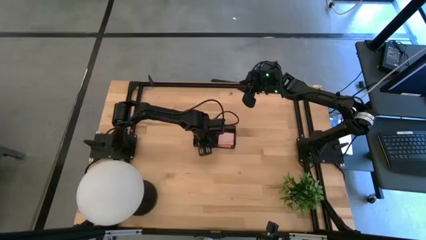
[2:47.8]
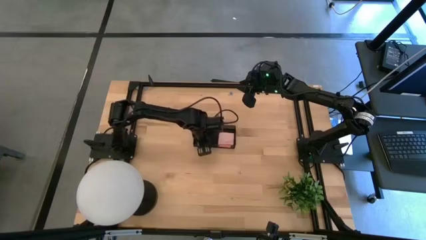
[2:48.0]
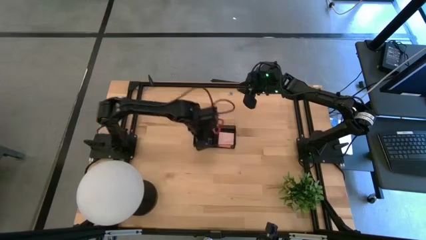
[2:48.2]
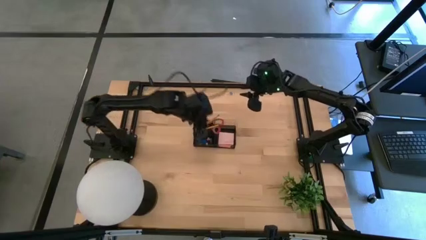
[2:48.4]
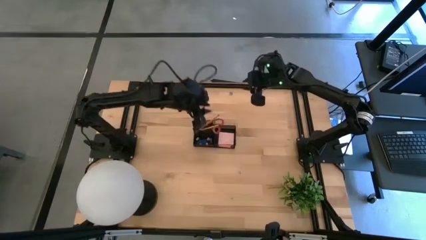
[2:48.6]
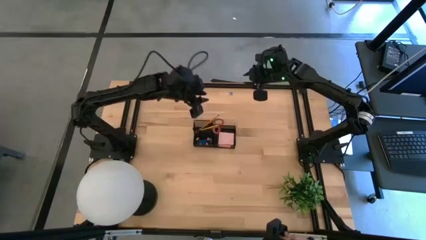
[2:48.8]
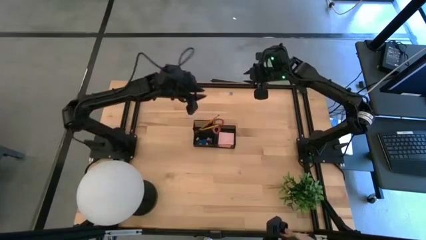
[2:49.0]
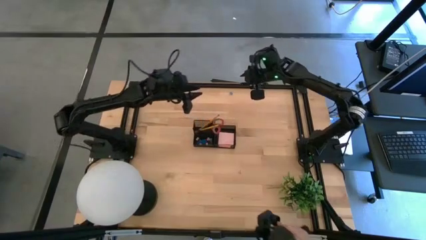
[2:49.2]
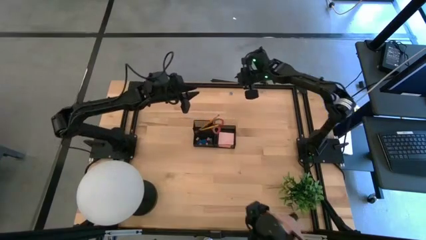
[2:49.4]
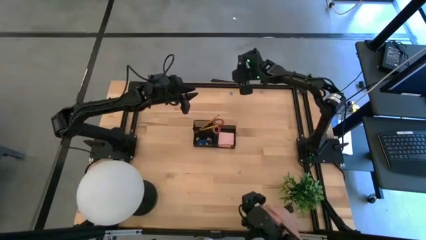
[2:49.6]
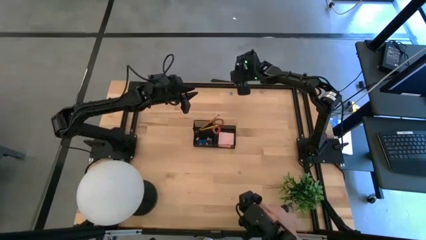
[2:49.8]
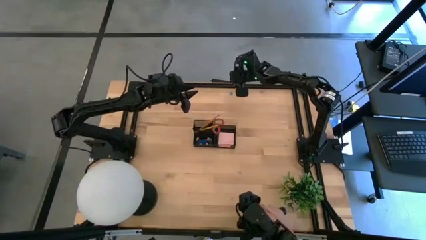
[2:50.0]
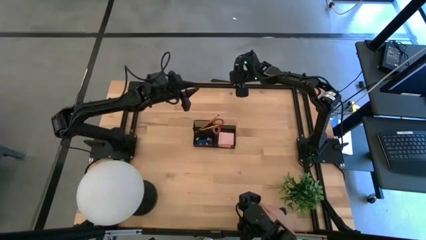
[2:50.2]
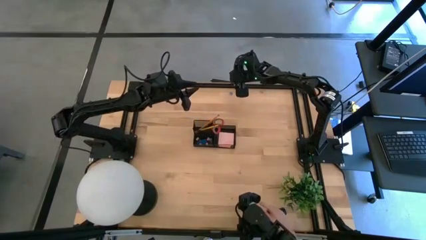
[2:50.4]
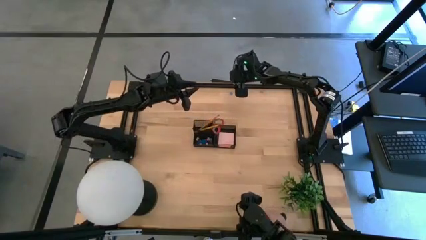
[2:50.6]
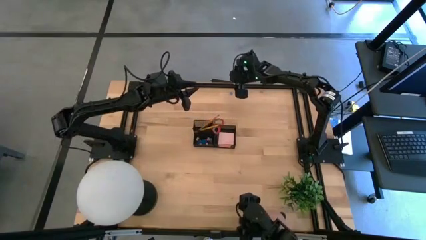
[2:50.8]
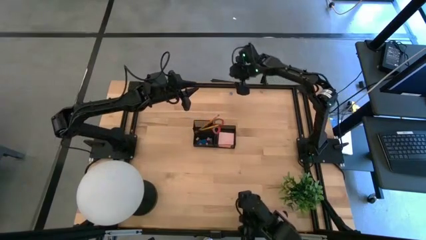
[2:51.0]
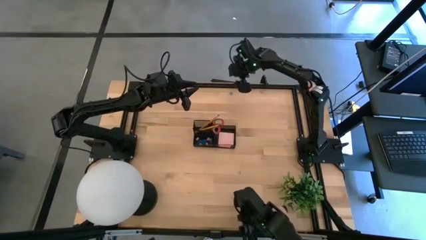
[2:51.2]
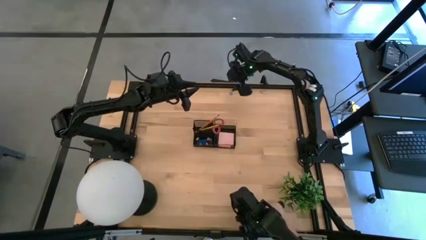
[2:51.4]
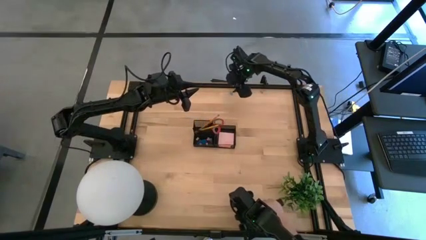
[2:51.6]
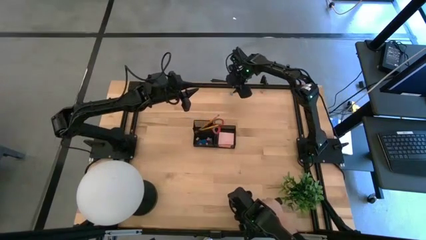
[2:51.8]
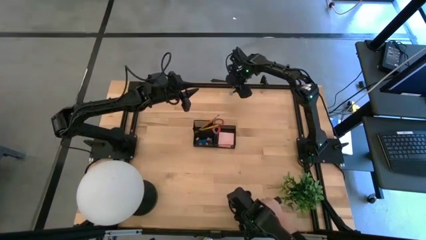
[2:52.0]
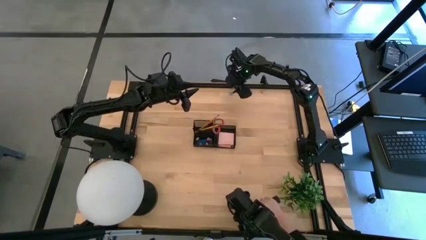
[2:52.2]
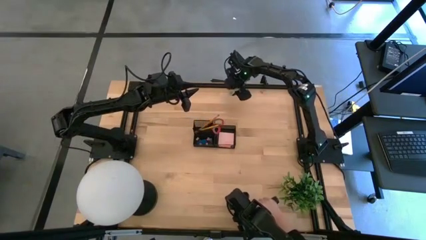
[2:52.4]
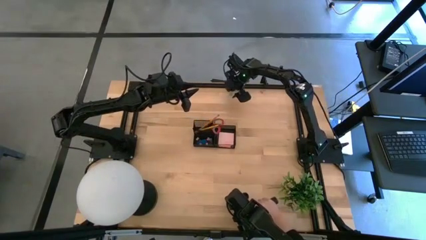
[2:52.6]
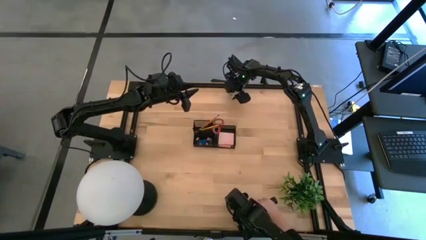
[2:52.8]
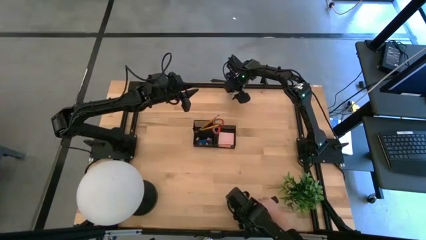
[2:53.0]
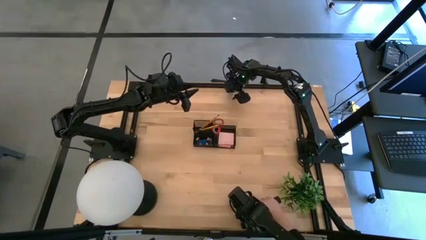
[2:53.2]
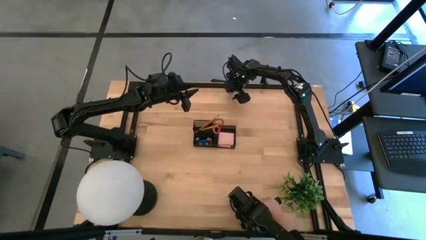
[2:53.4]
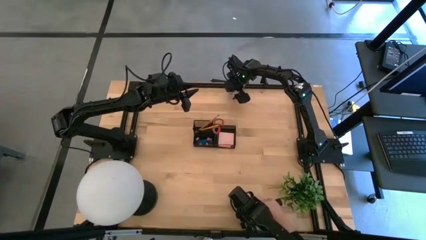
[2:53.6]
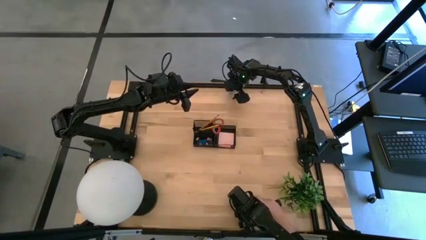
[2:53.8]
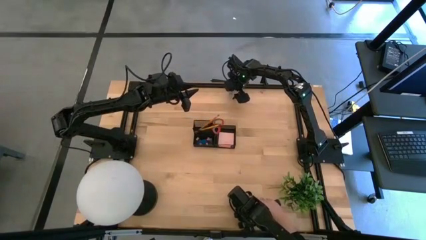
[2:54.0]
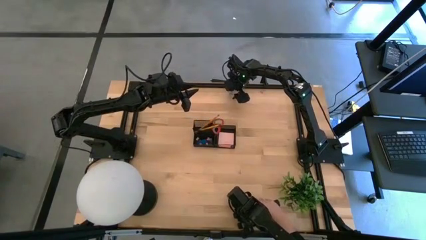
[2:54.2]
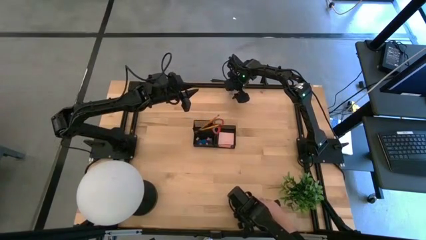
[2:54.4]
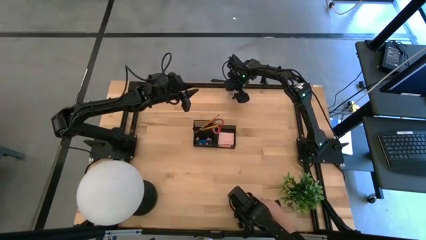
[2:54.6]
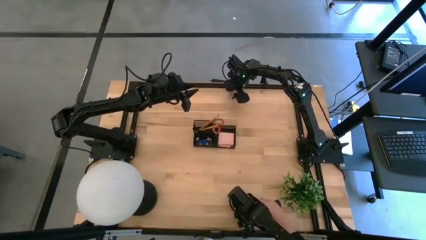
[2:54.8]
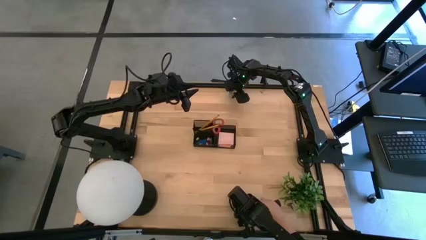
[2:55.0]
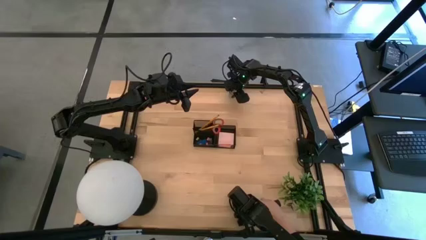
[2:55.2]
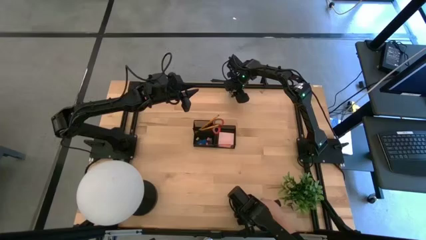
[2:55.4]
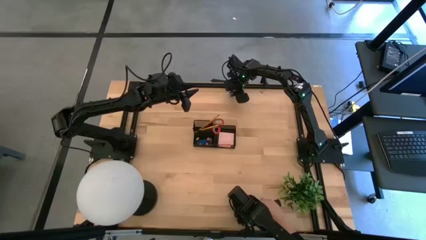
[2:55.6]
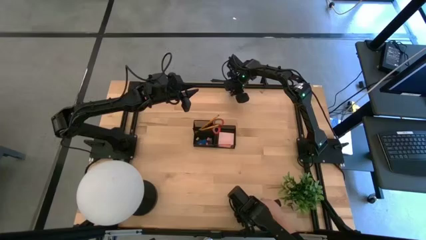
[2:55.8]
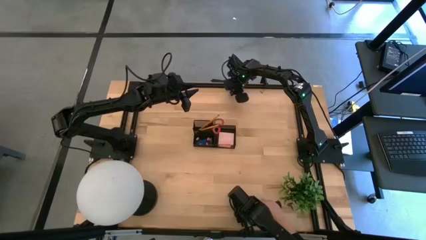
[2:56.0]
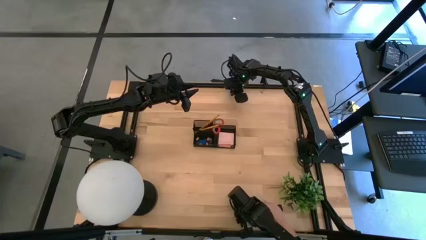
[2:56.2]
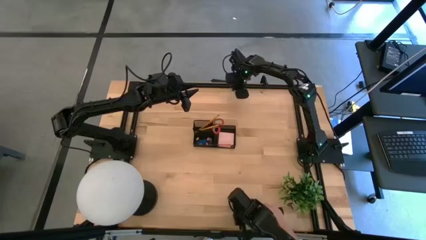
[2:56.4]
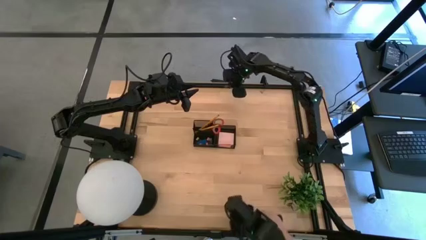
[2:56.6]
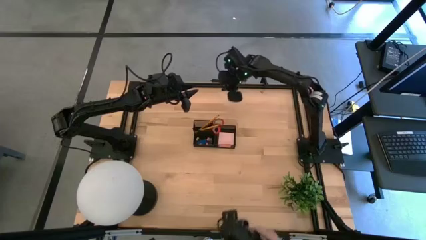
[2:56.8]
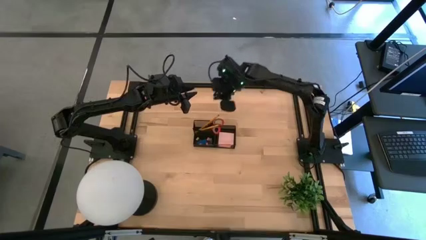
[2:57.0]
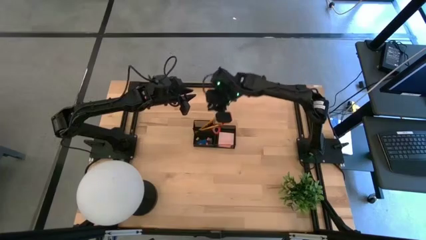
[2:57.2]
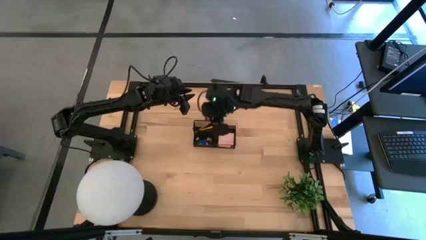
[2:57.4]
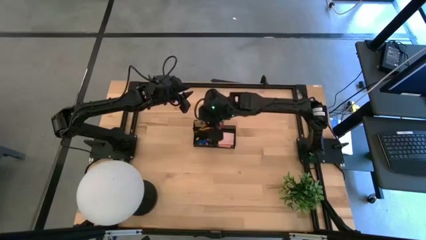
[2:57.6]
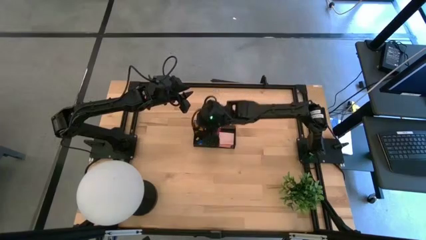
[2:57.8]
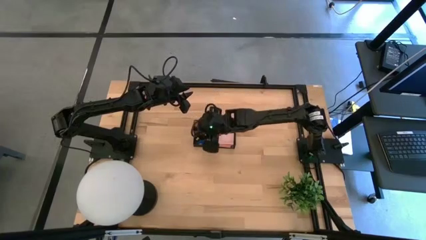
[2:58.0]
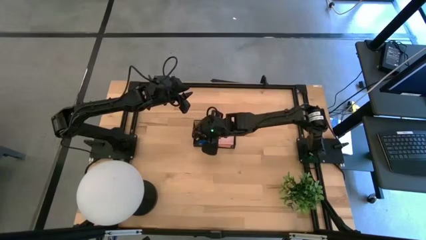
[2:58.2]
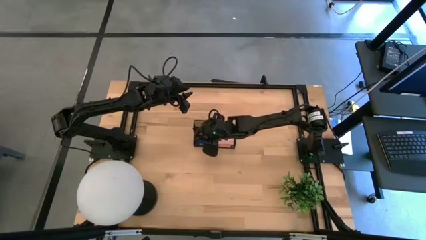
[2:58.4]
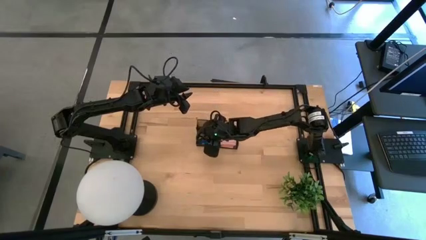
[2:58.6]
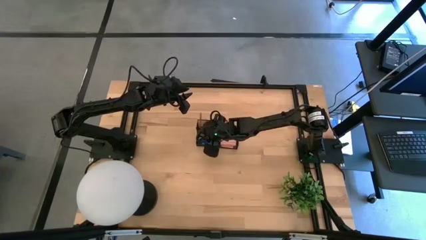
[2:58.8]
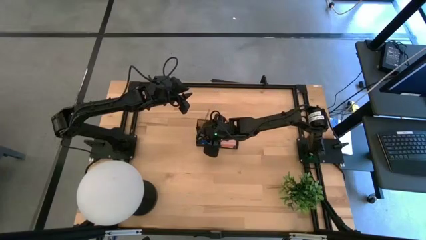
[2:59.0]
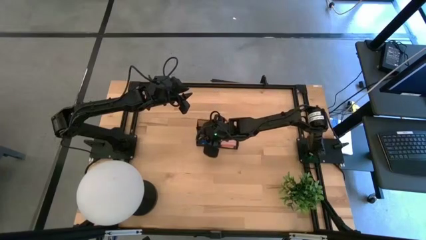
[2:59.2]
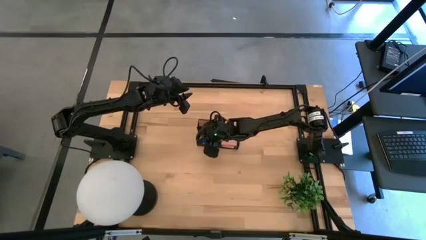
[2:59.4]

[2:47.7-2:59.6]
Task: Pick and place office supplies into organizer
Put the blue binder clip into the desk organizer

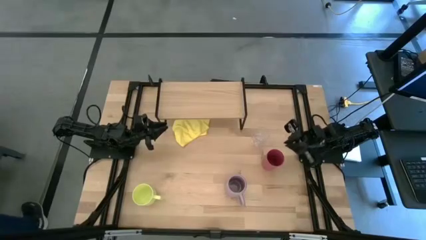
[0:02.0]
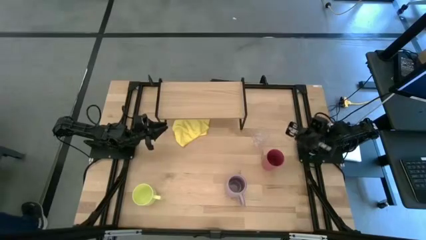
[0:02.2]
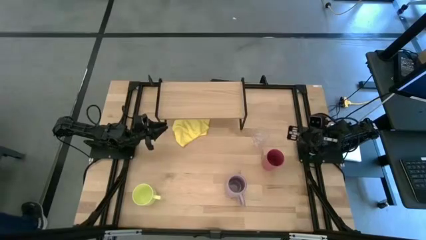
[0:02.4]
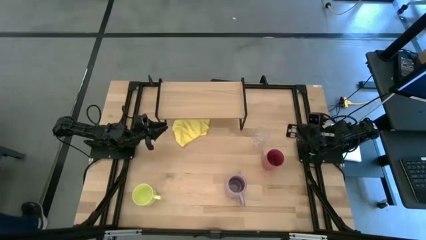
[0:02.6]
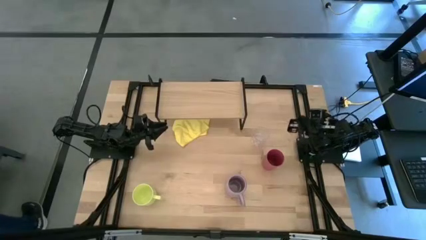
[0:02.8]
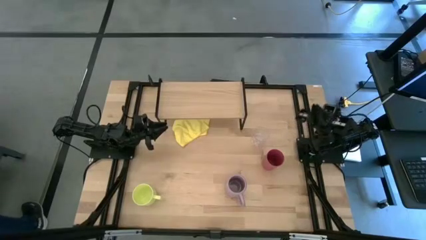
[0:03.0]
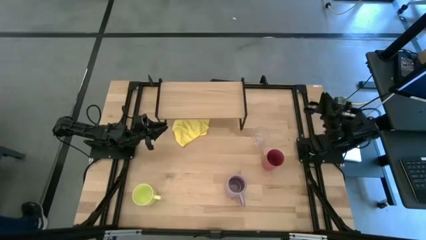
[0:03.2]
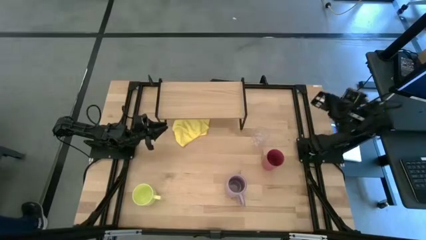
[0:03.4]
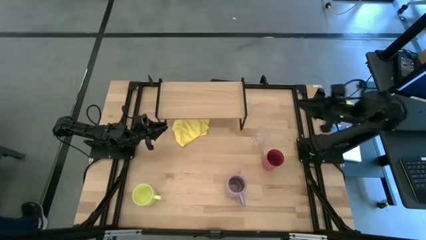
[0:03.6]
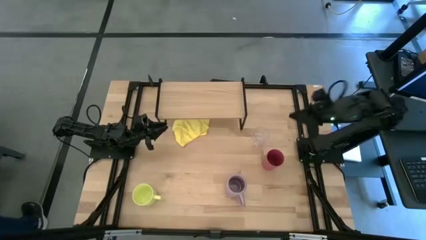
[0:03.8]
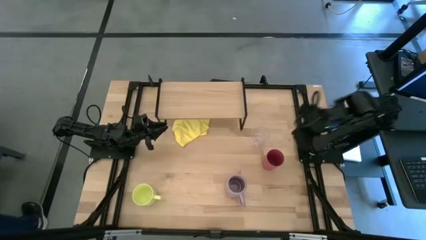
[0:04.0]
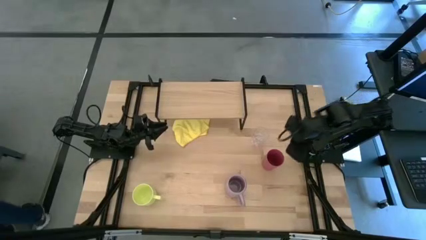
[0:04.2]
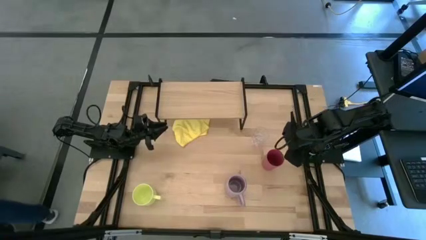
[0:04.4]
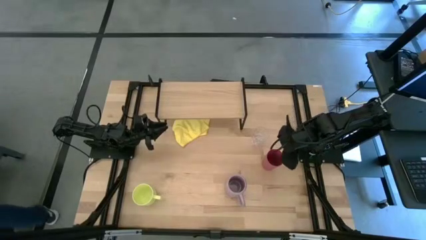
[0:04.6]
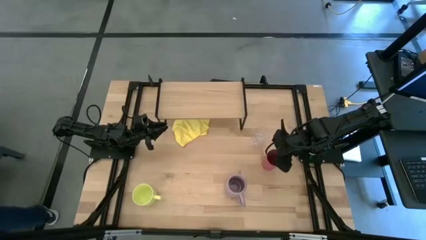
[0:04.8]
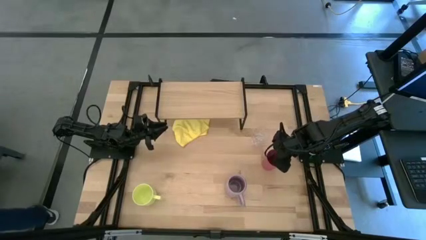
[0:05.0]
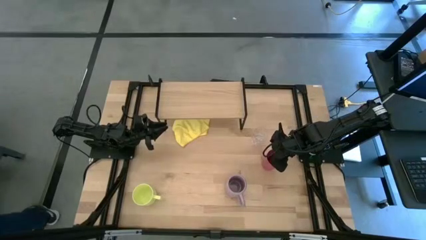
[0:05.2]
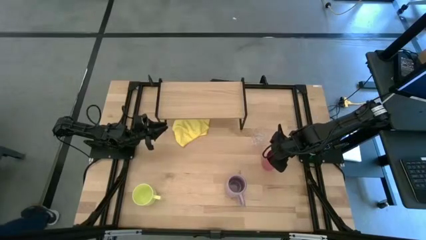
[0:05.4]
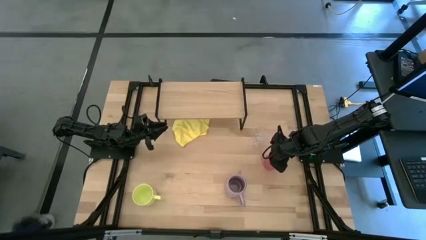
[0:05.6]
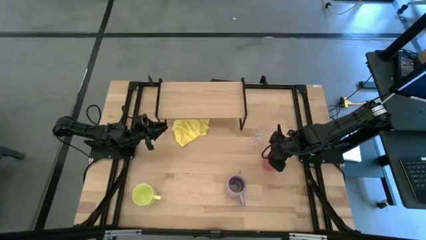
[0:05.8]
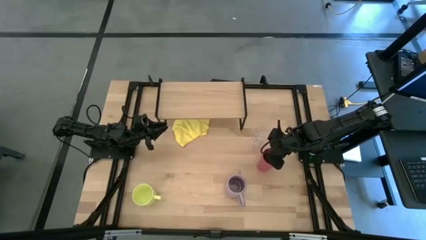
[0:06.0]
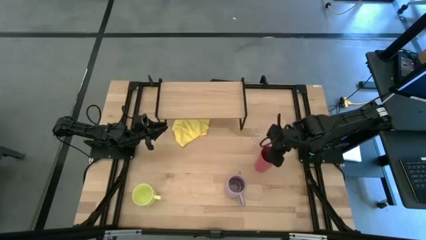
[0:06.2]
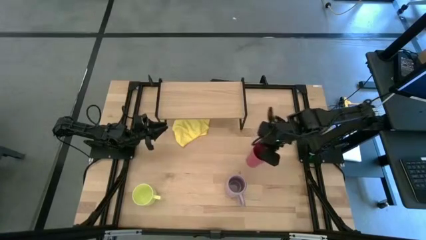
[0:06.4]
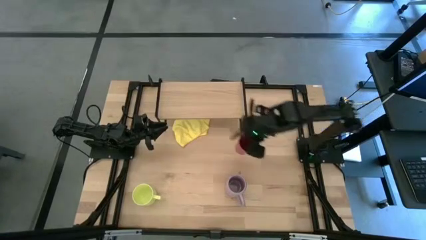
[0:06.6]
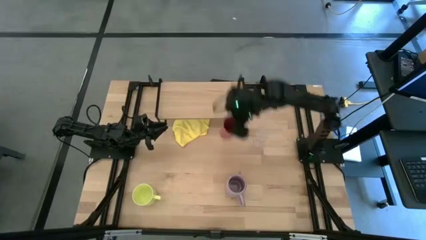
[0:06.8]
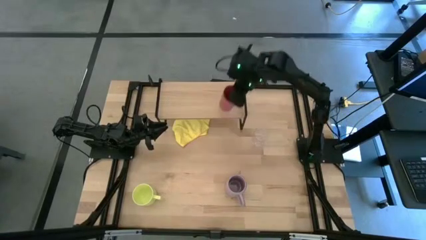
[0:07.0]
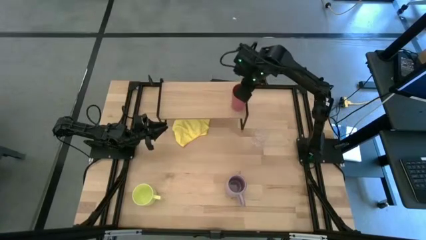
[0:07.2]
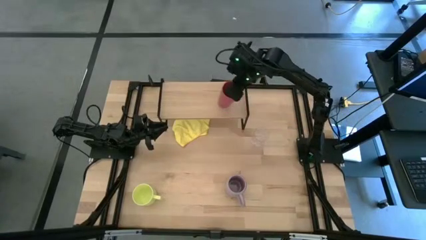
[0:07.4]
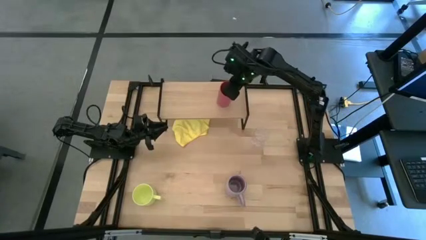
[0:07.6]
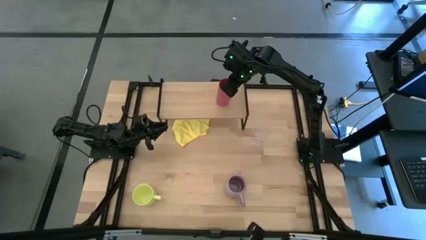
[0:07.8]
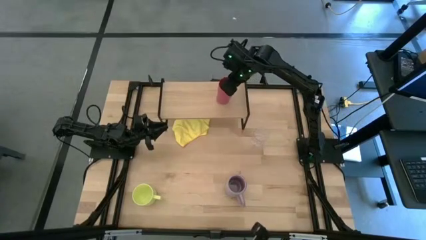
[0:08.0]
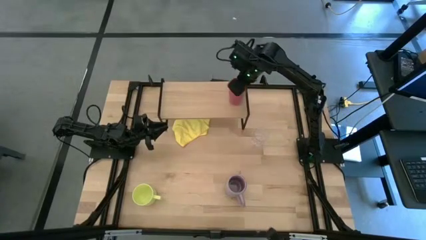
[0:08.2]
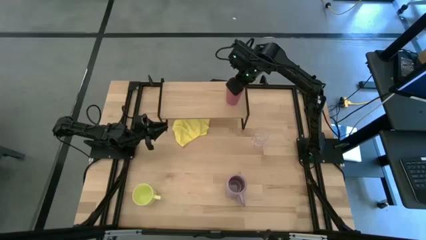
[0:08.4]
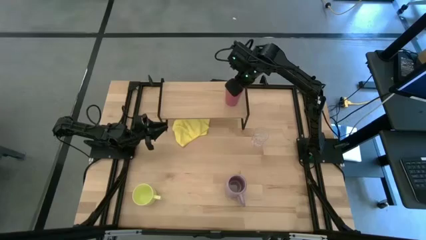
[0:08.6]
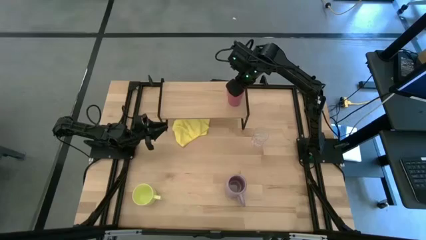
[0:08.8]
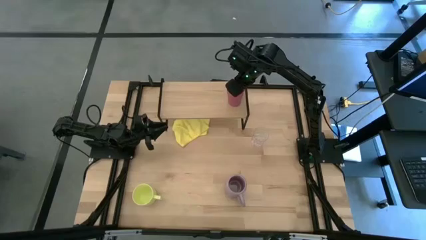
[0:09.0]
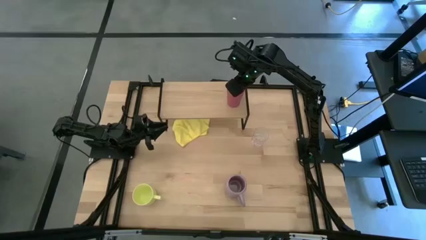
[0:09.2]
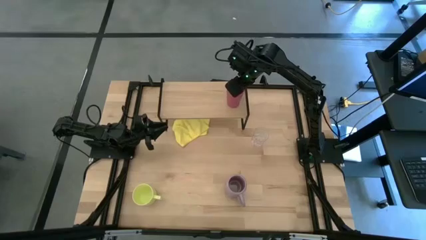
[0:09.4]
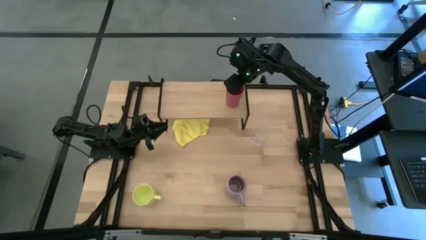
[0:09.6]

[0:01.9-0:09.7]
Task: Stack small to large cups/mugs on shelf
Put the pink cup on the shelf
